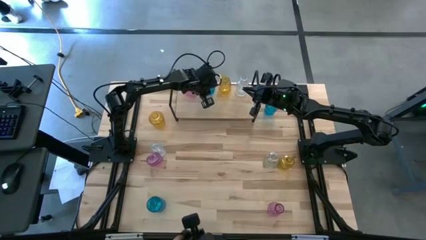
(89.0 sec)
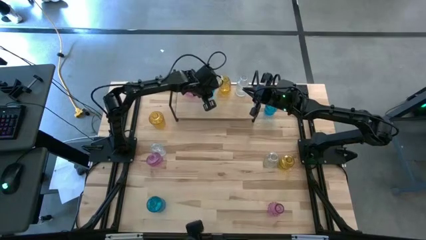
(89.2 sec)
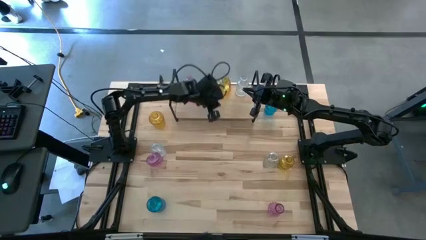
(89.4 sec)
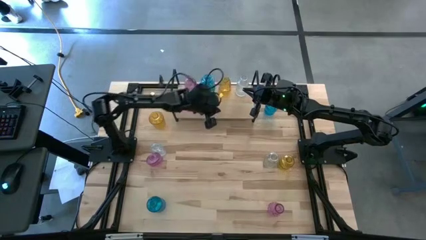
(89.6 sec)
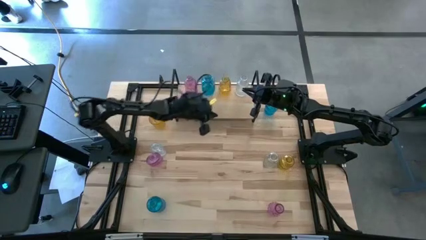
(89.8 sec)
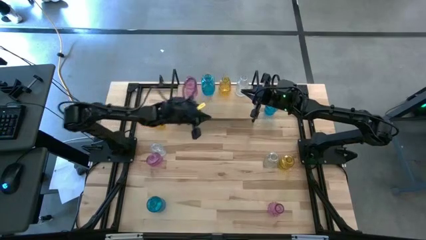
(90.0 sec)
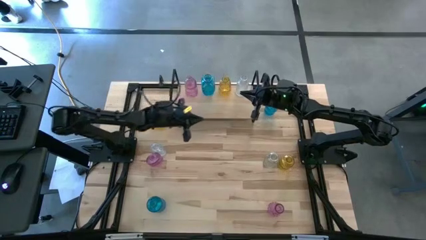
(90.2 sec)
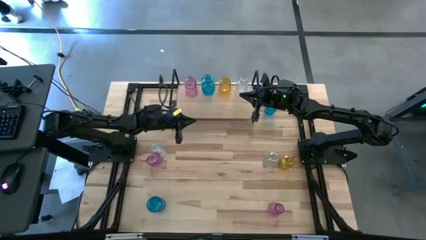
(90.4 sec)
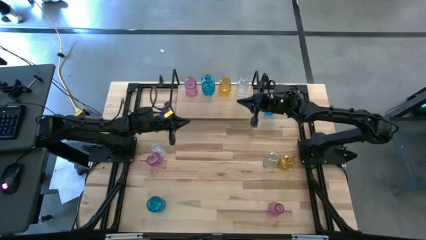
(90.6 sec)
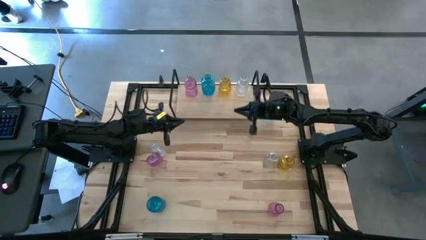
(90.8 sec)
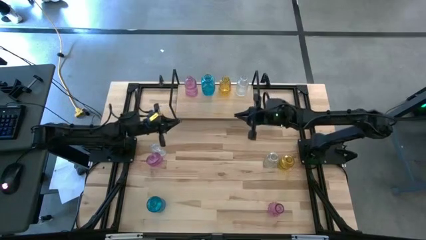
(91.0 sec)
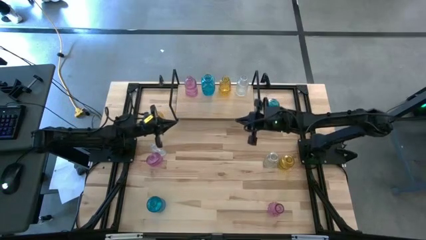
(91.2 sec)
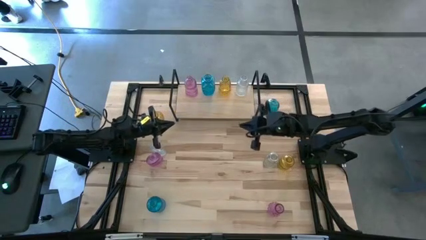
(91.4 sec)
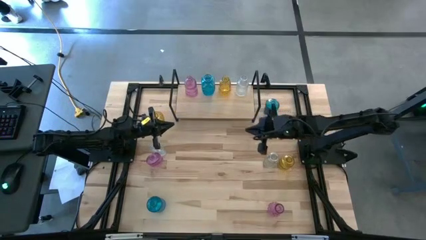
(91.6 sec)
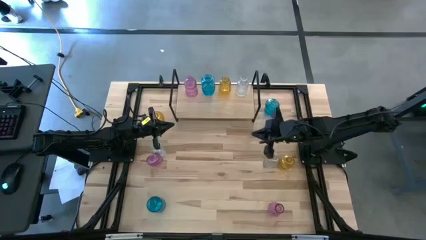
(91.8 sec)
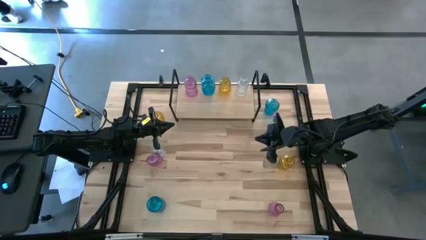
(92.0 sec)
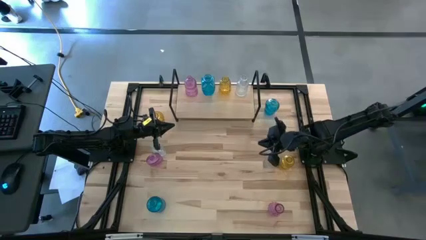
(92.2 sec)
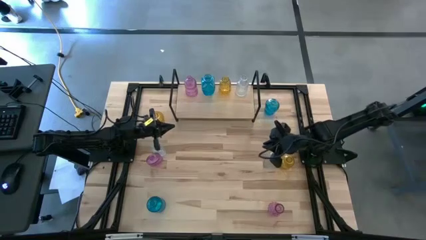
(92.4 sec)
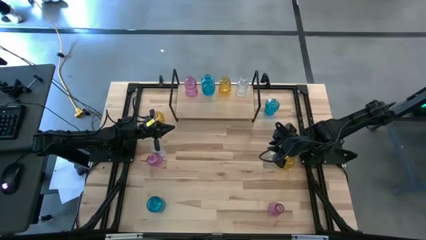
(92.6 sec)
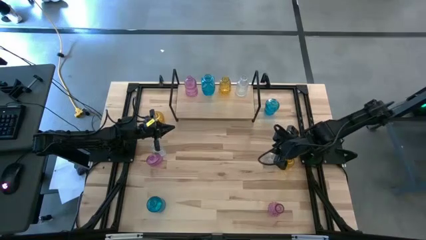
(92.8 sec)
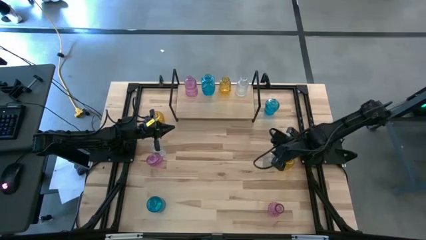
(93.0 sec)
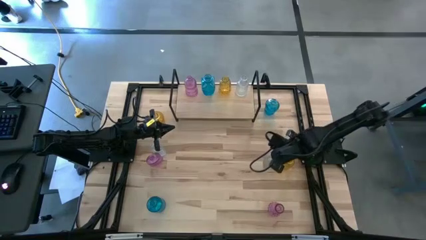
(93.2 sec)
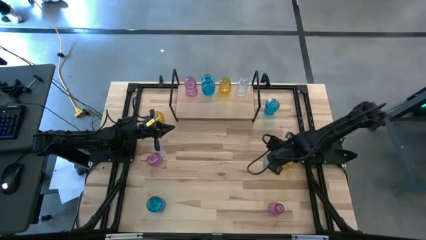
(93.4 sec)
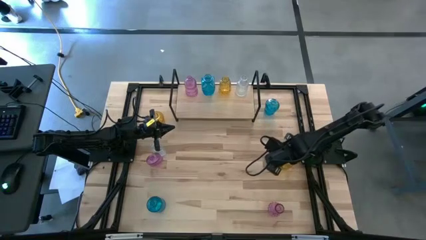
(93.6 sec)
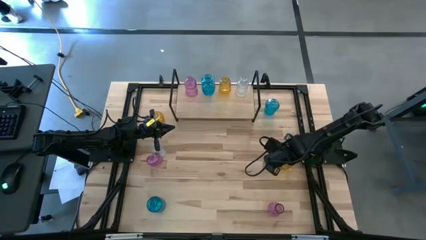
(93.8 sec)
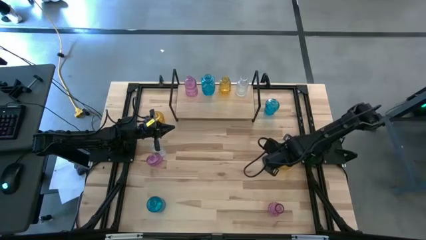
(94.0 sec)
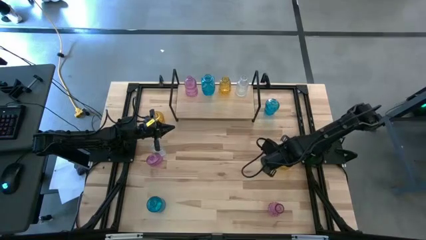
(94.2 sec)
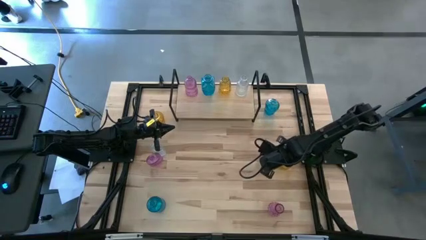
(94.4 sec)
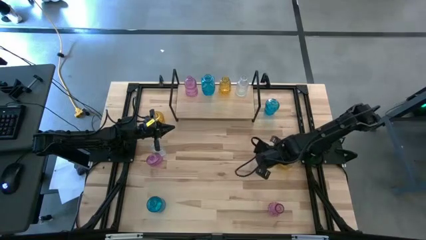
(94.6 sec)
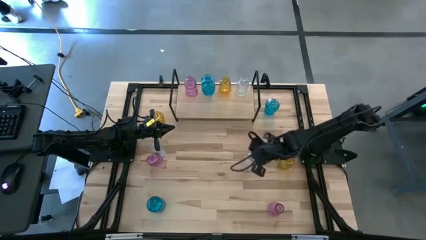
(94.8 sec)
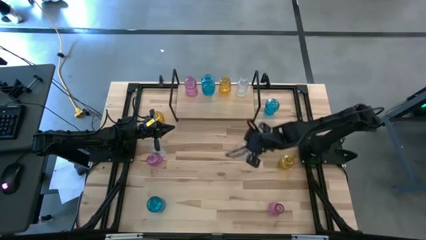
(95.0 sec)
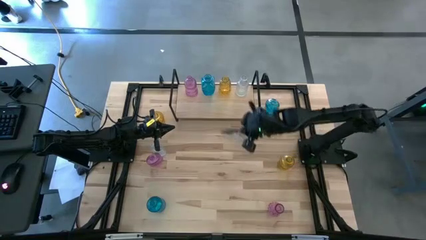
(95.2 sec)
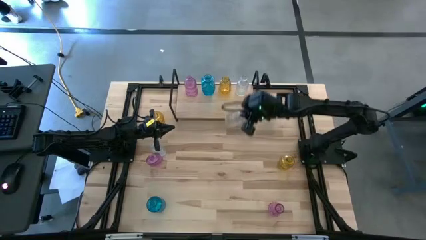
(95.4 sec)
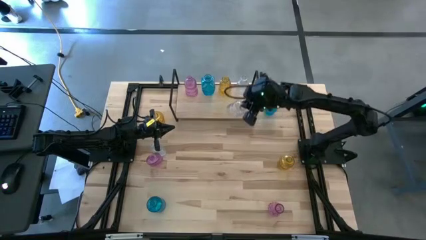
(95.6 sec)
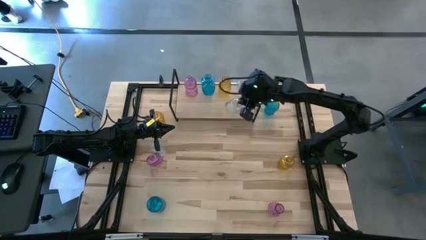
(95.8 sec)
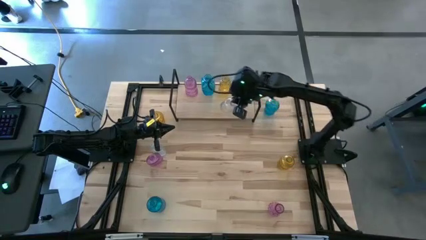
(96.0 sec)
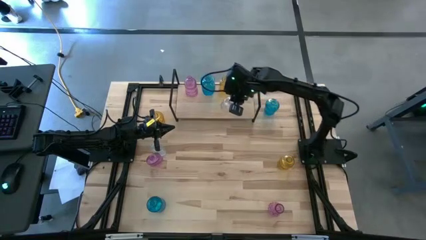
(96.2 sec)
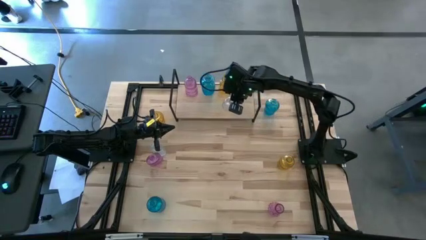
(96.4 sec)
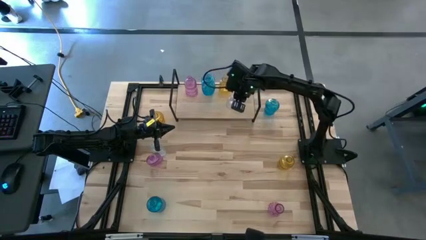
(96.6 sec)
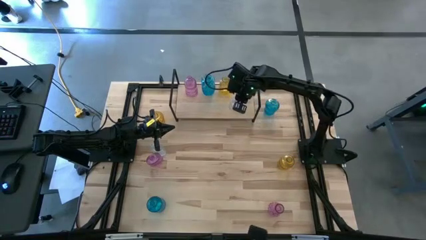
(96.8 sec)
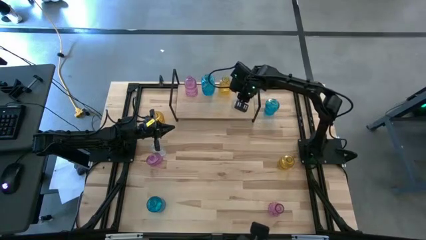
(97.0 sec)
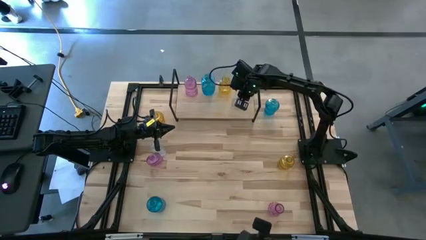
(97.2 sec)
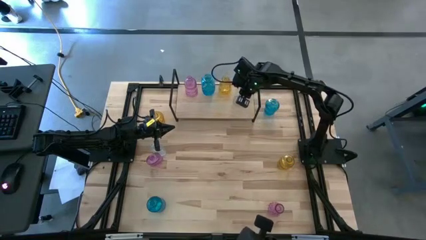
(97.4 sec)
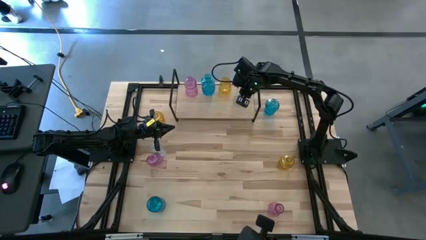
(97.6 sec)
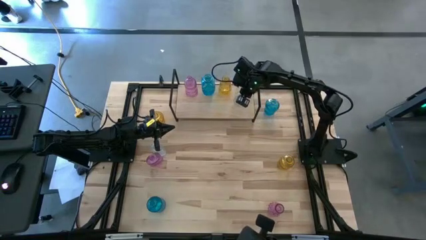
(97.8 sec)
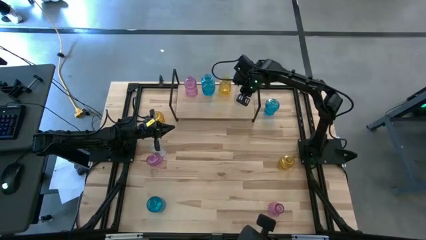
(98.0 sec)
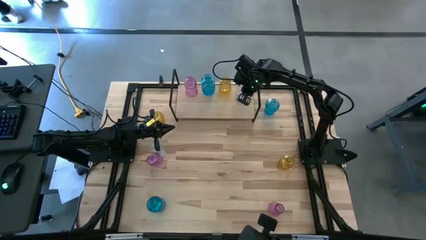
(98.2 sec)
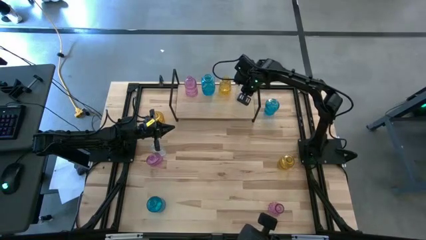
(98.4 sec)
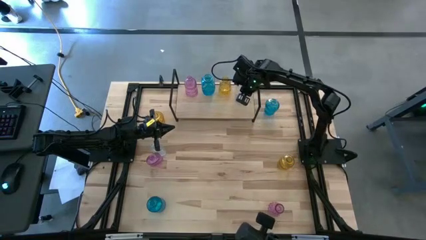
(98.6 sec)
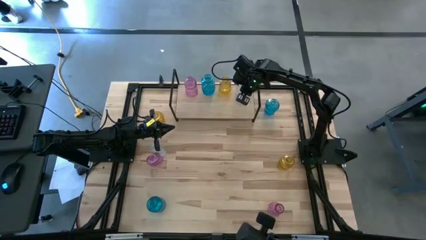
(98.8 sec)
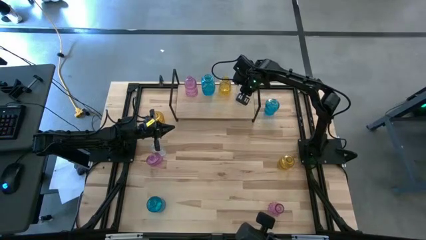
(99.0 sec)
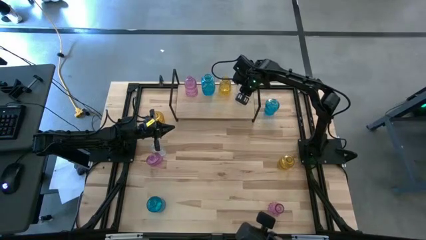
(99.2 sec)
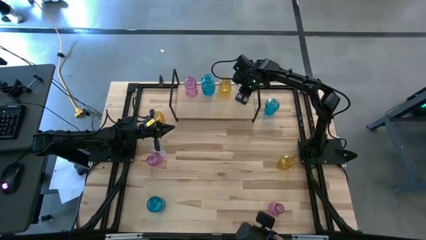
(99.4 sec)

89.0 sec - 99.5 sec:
Task: sort vases onto shelf
Put the right transparent vase on the shelf aligned with the transparent vase

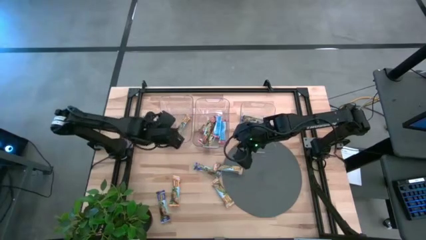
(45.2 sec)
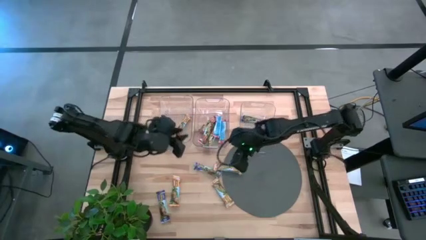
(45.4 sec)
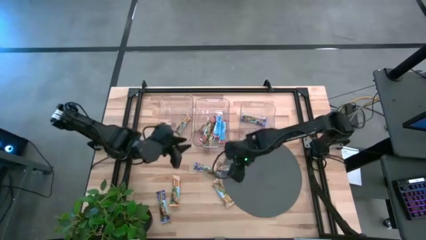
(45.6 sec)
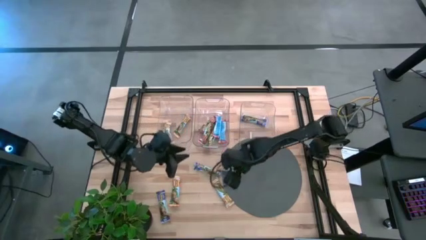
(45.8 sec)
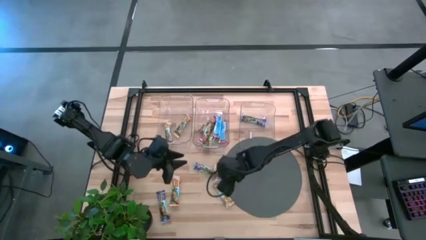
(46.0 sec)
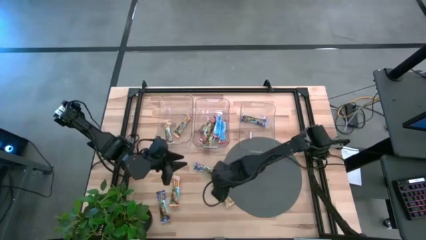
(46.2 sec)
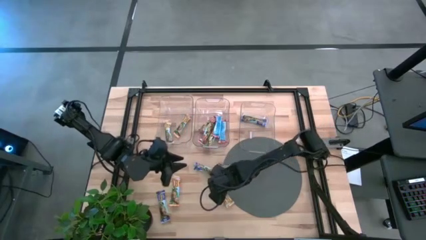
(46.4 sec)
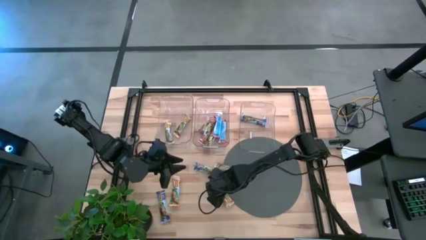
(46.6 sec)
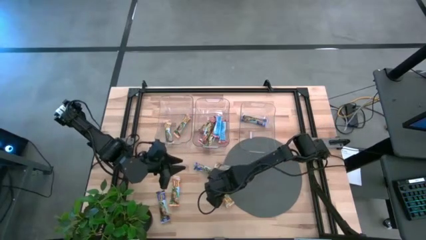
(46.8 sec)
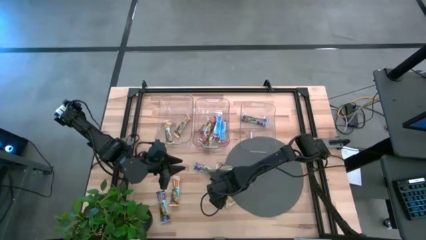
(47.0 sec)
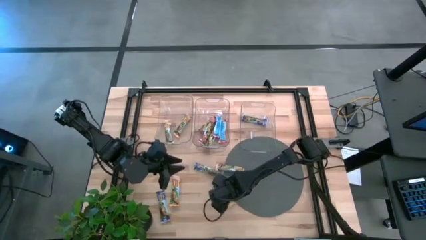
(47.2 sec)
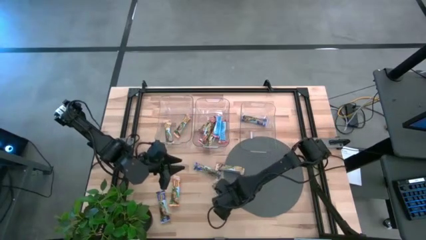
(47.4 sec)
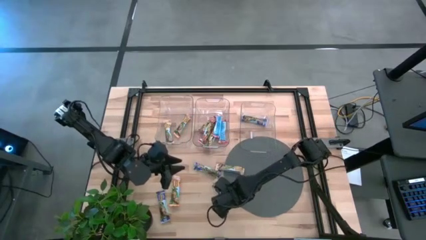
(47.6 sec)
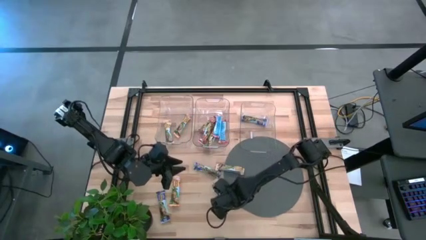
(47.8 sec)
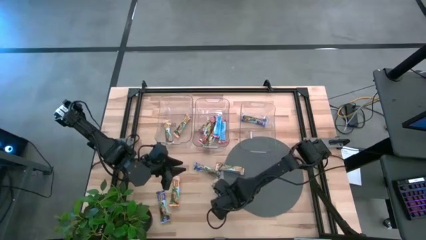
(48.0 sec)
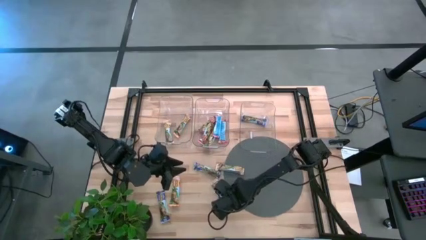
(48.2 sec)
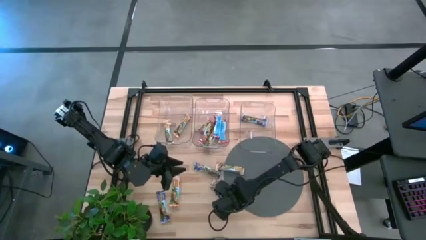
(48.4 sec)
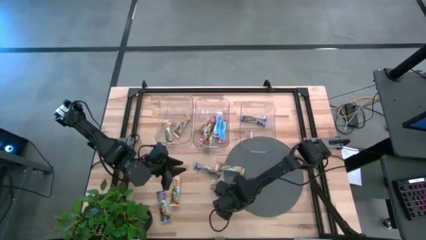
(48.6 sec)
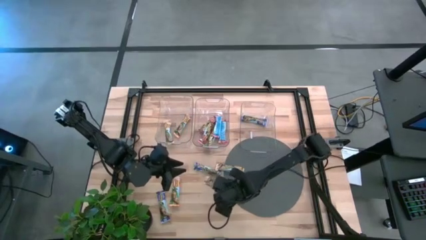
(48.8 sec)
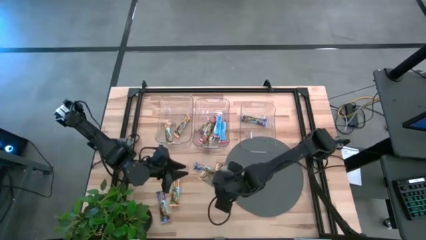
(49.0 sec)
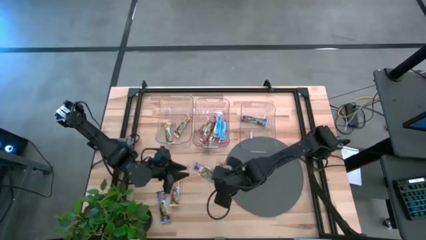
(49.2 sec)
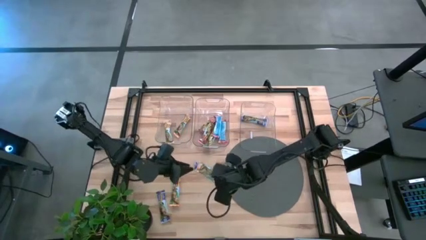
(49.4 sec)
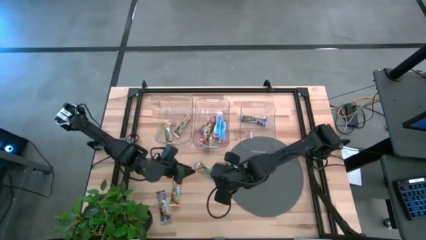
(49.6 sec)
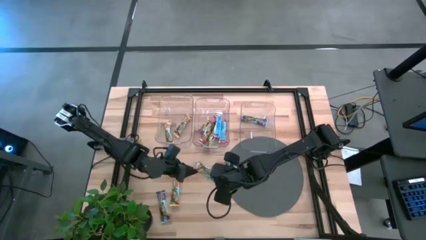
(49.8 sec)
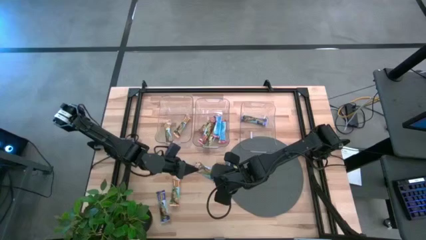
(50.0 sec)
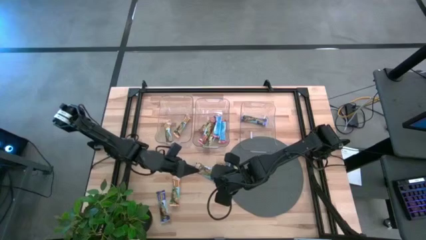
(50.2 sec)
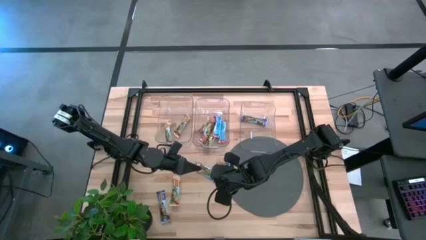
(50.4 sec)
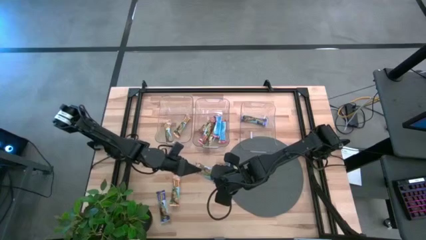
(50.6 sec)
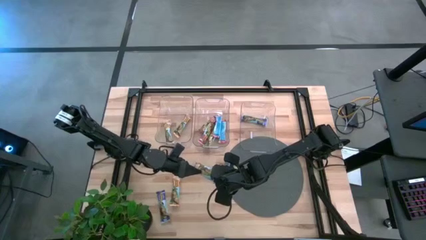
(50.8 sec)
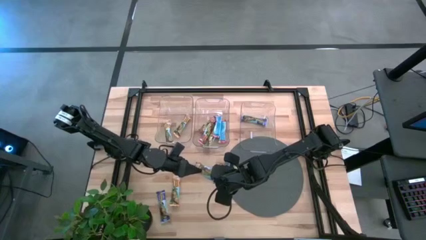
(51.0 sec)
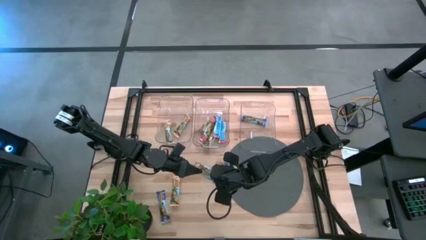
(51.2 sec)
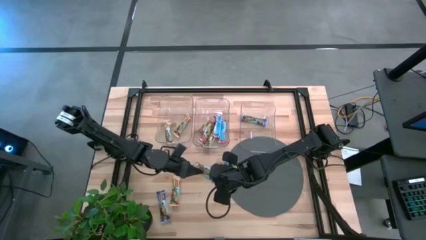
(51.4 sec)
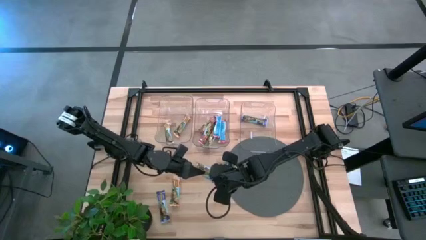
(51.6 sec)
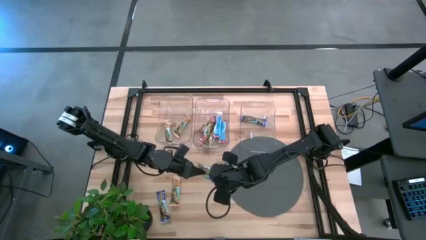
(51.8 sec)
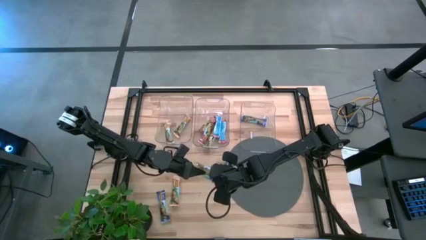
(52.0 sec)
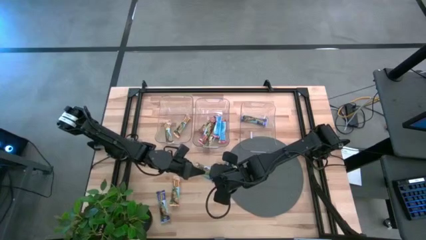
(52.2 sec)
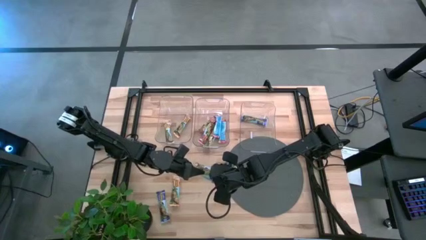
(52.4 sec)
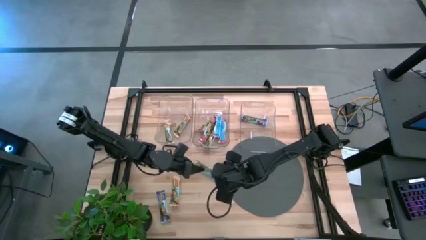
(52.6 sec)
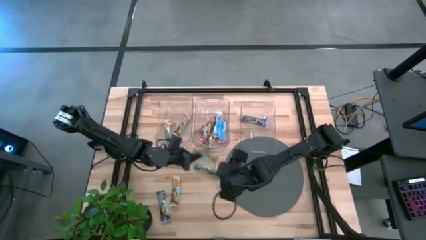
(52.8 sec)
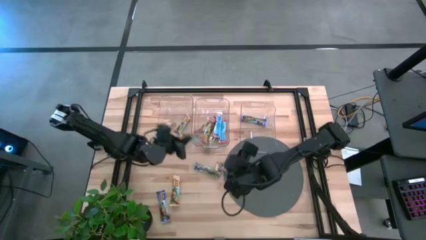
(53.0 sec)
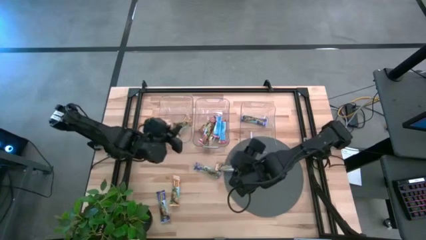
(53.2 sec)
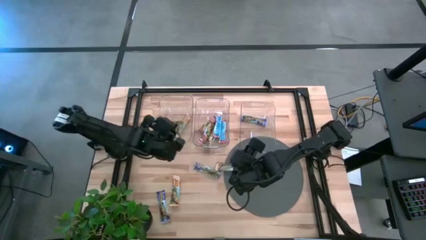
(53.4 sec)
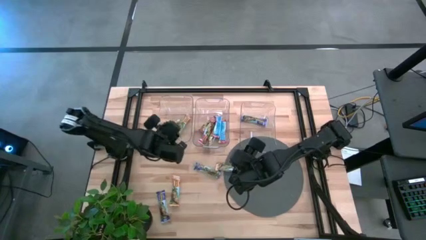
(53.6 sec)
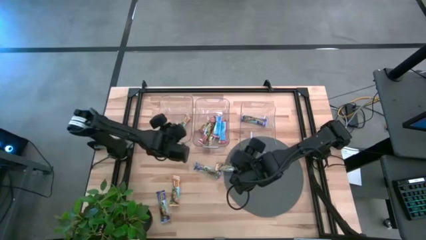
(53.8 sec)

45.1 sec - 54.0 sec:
Task: Pick and place Granola Bars by type
Put the yellow granola bar into the left transparent bin
